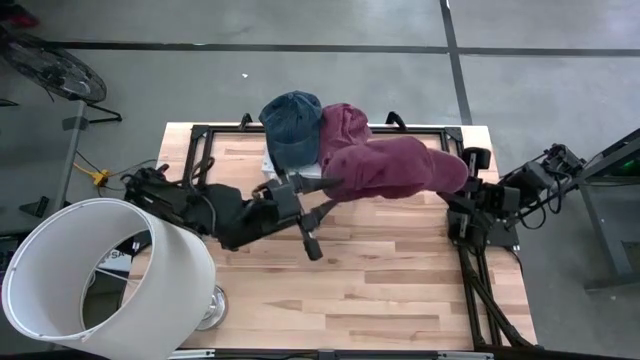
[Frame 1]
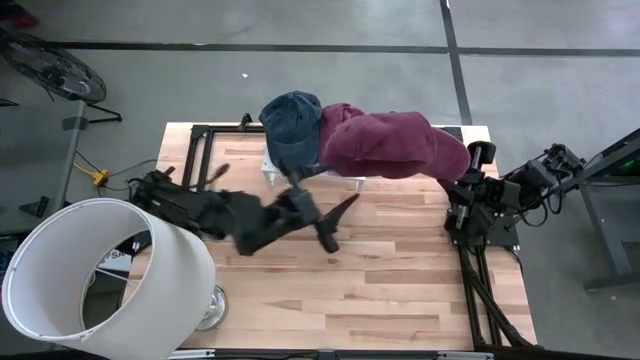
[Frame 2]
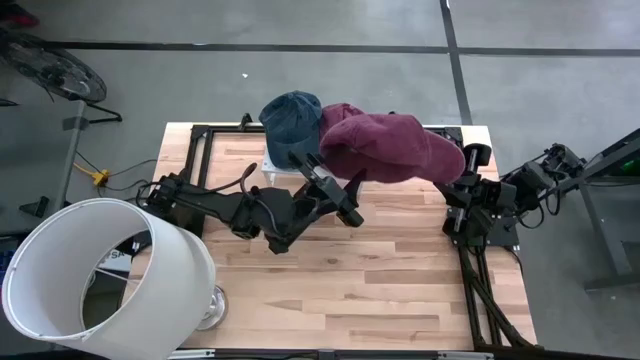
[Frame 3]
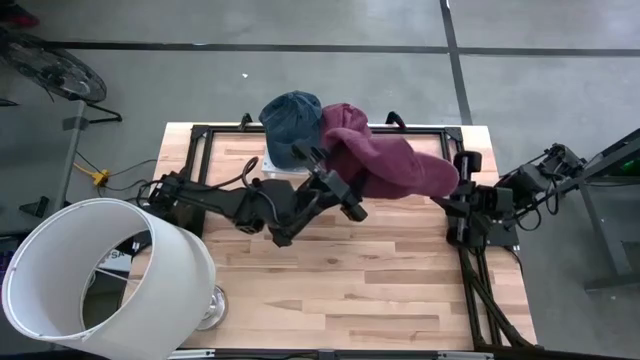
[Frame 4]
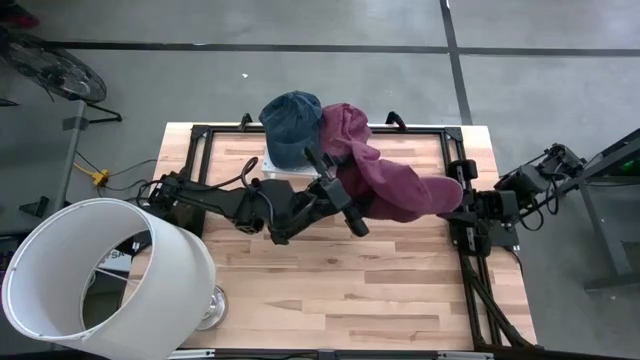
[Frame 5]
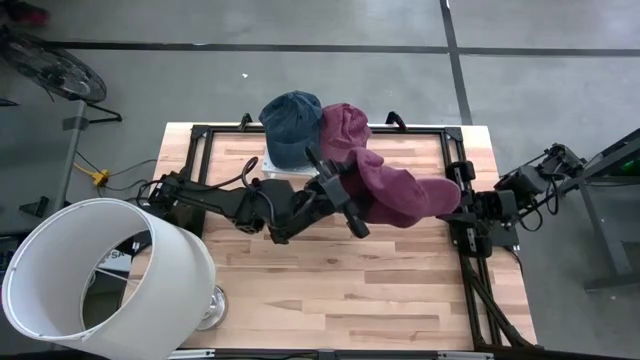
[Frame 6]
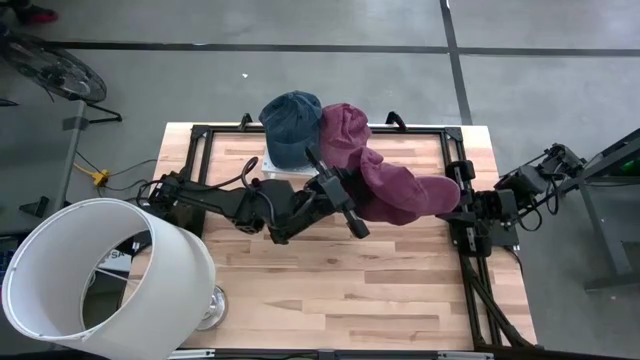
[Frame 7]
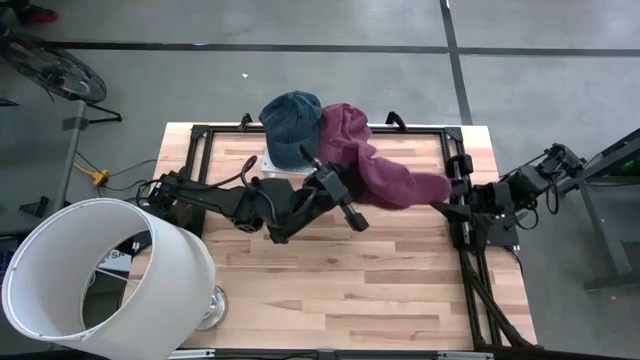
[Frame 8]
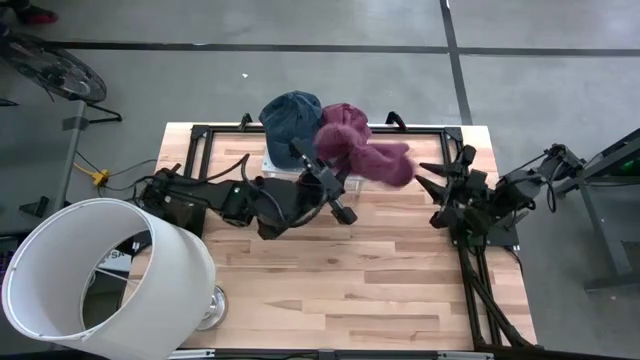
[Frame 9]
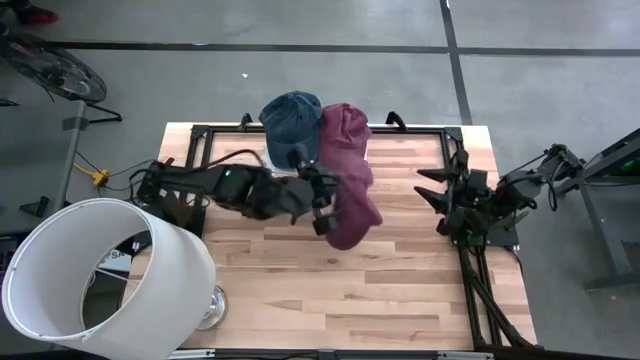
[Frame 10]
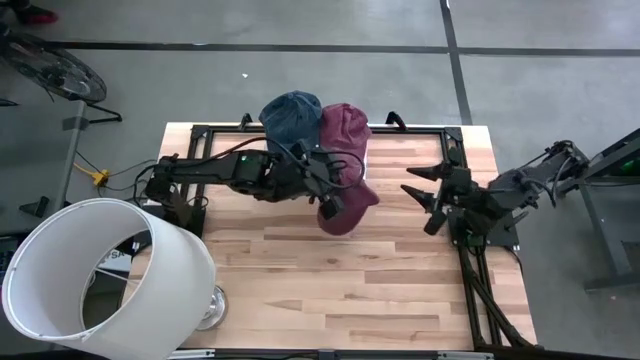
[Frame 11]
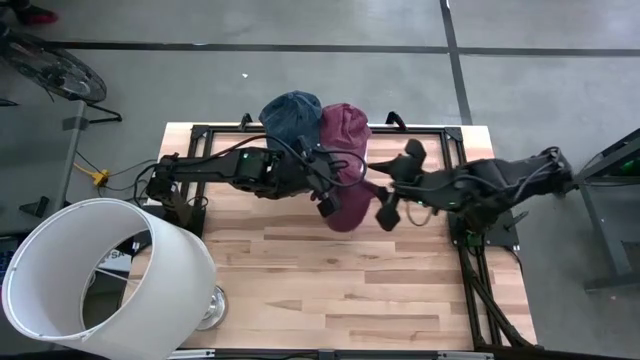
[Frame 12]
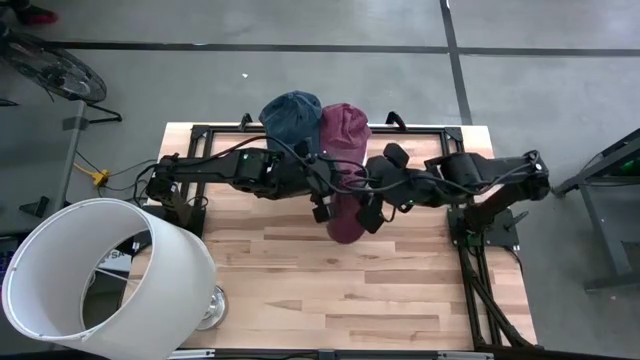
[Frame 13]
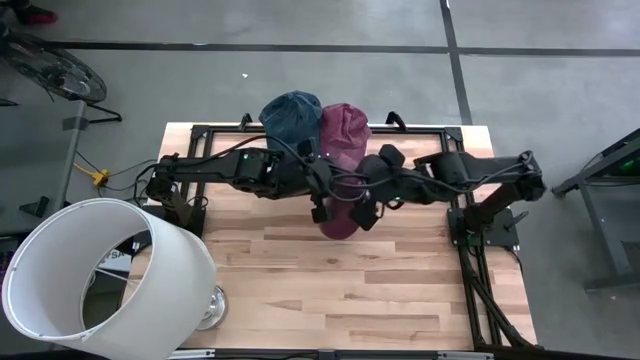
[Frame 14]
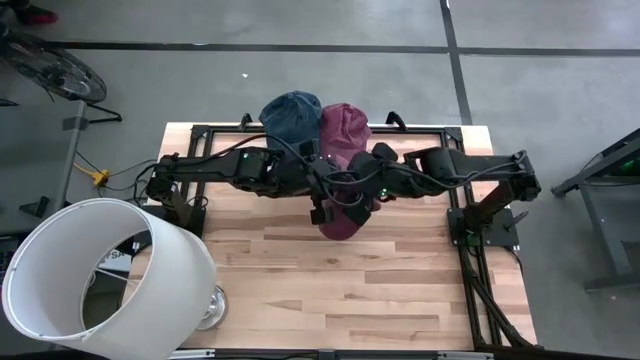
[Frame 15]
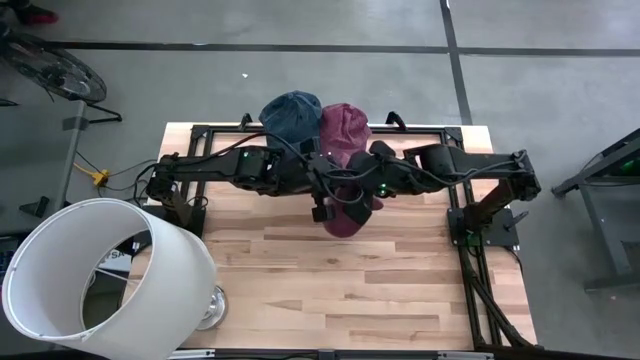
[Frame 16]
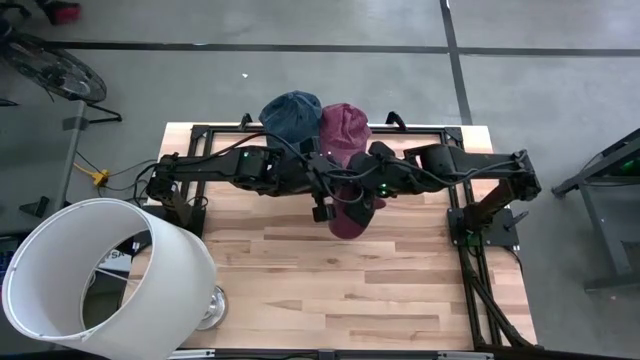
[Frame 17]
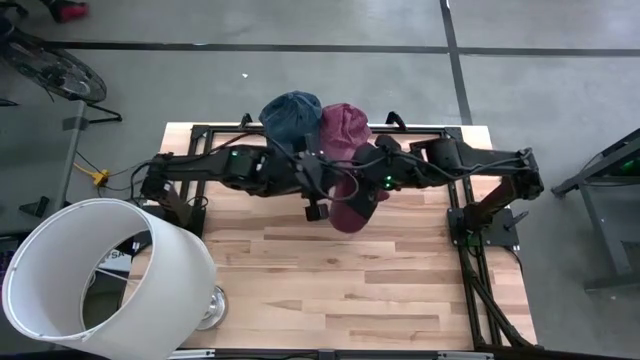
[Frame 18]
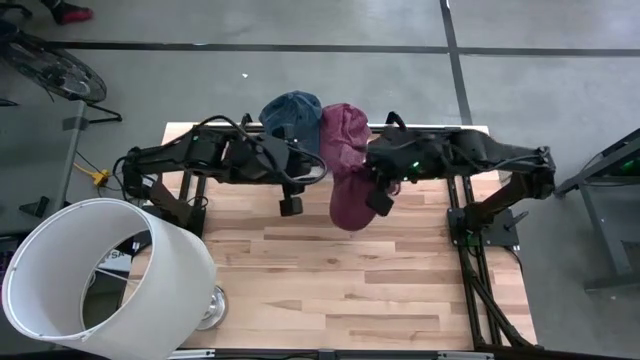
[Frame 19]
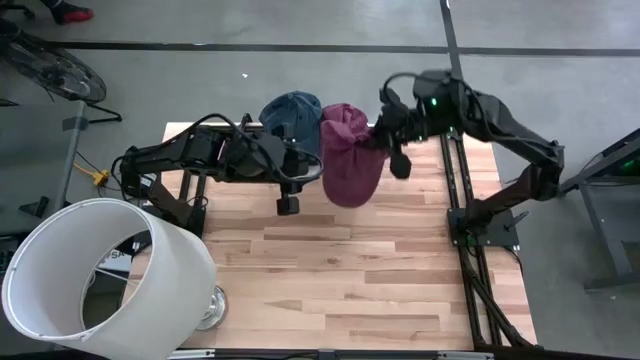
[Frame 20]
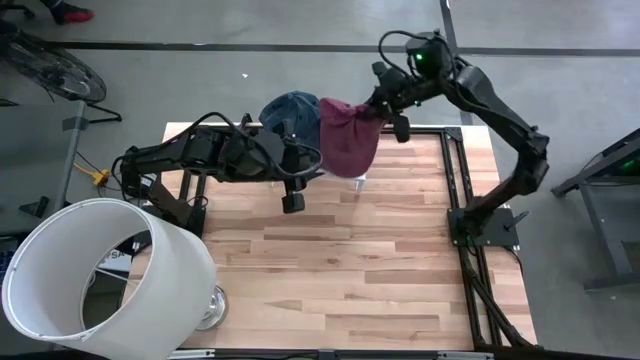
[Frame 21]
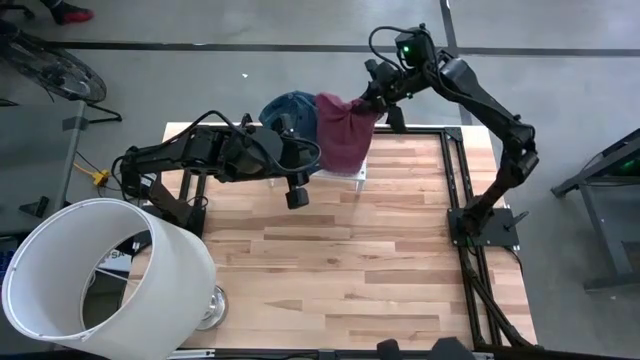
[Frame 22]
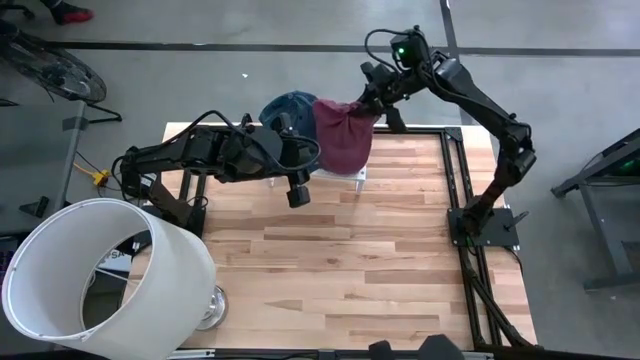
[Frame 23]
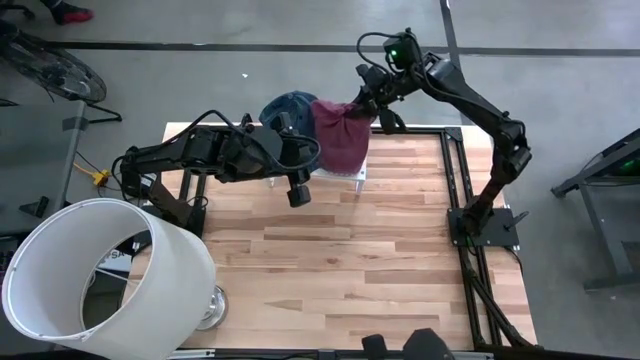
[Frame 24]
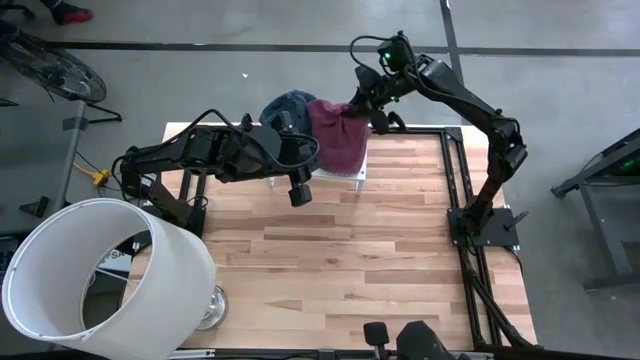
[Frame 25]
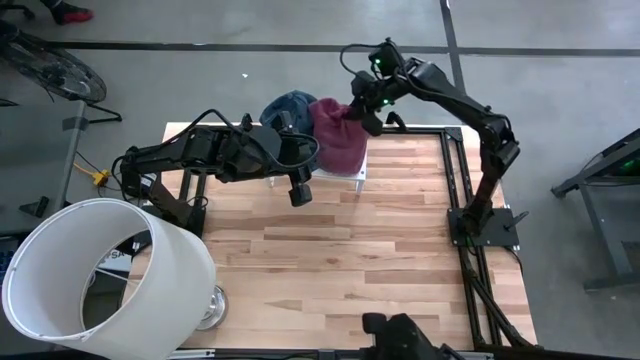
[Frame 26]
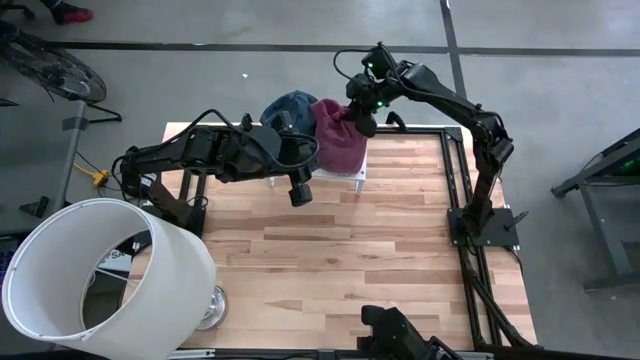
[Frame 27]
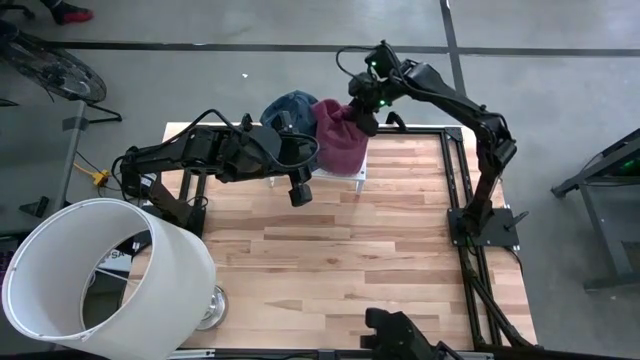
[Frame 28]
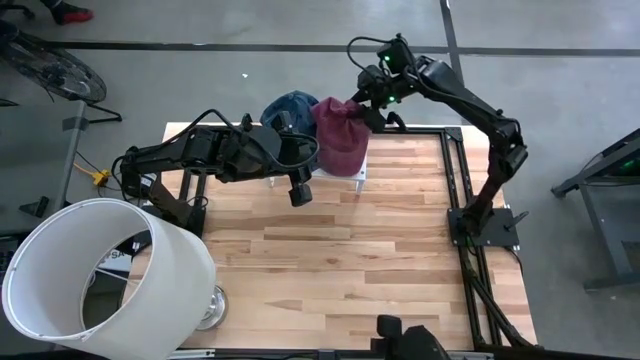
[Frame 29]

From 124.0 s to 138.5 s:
Task: Pick & Place hat
Stack the dark red on top of the dark red cap on the shelf

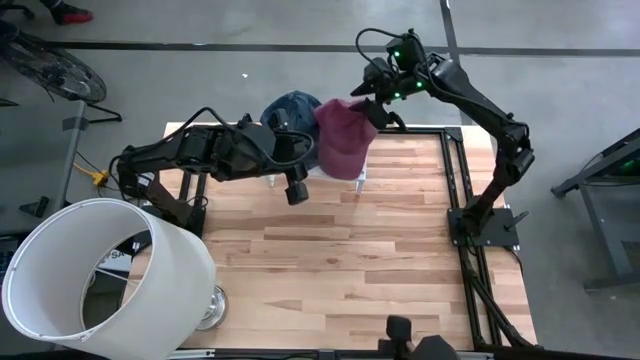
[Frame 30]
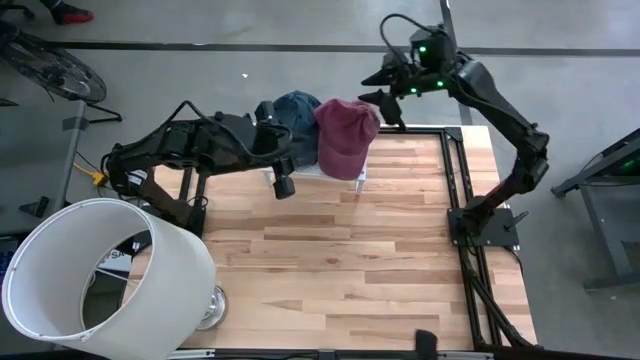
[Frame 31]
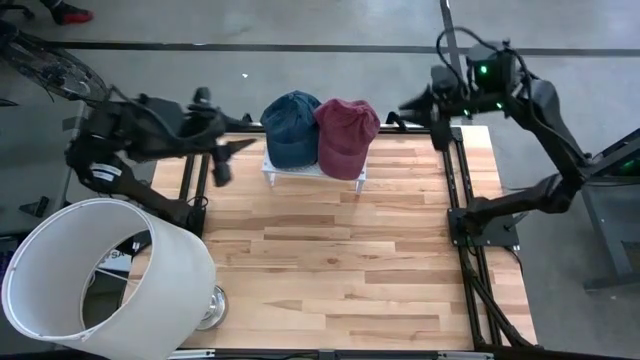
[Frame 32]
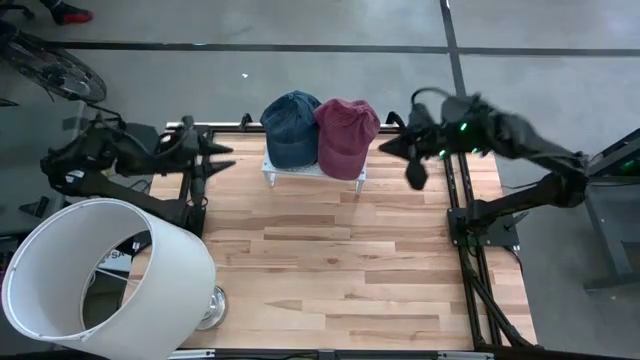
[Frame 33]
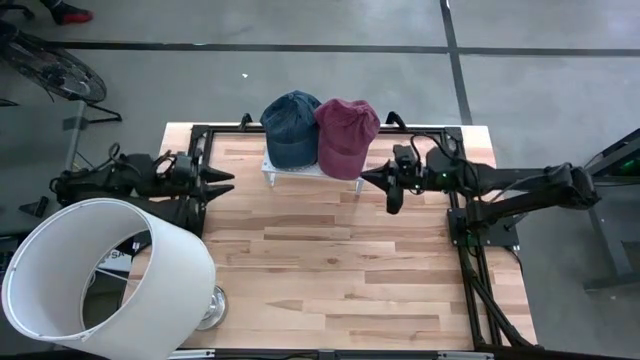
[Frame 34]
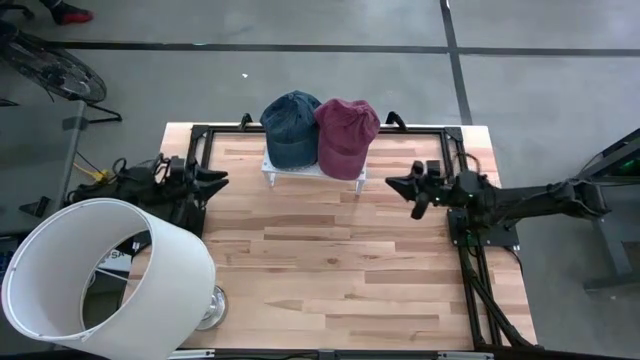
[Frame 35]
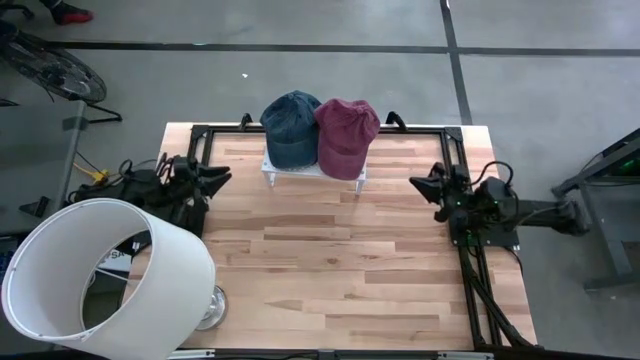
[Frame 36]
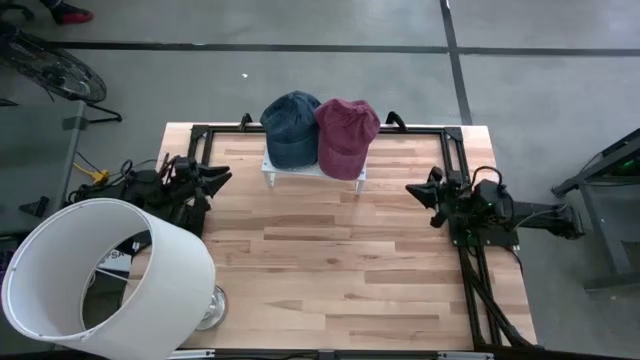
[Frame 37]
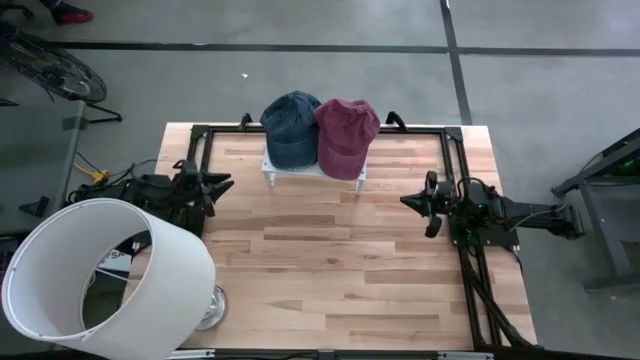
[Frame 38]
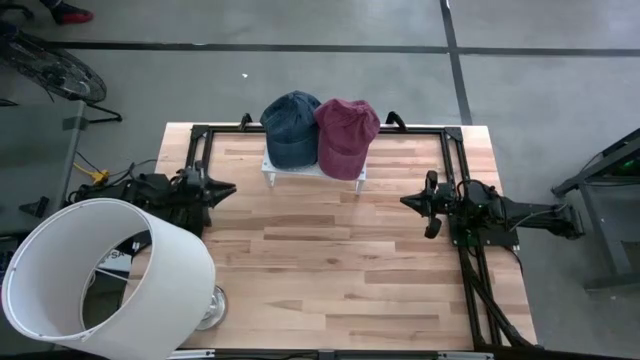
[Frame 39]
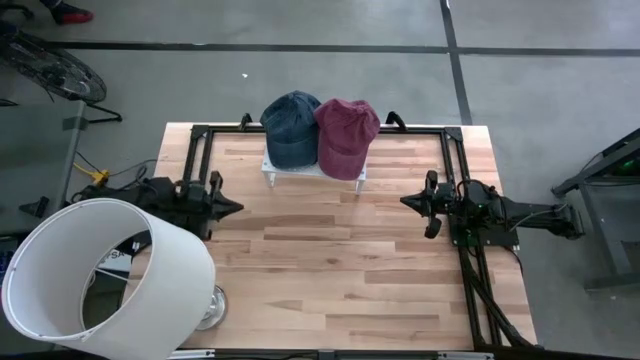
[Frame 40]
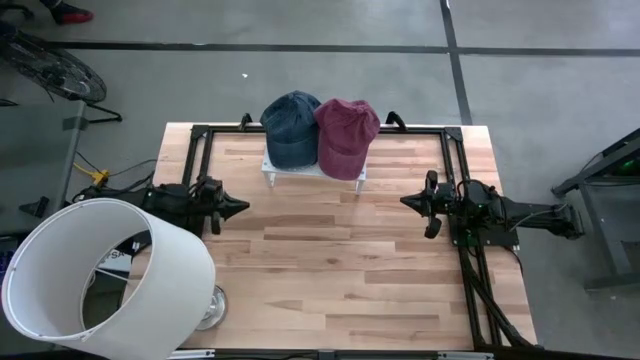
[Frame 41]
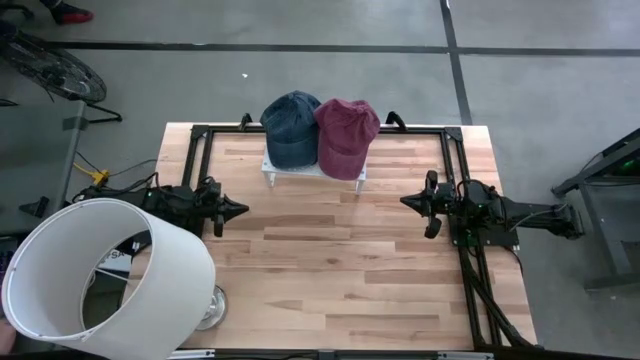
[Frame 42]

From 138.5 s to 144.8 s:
Return to Home Position
